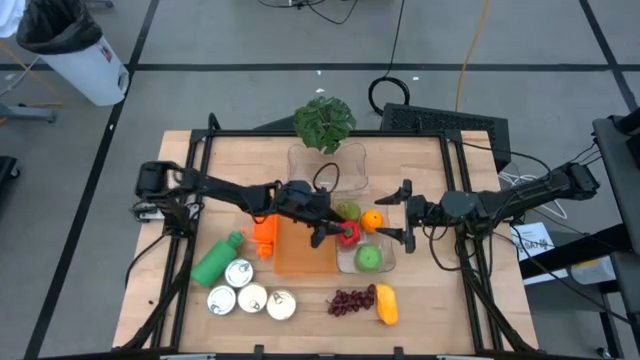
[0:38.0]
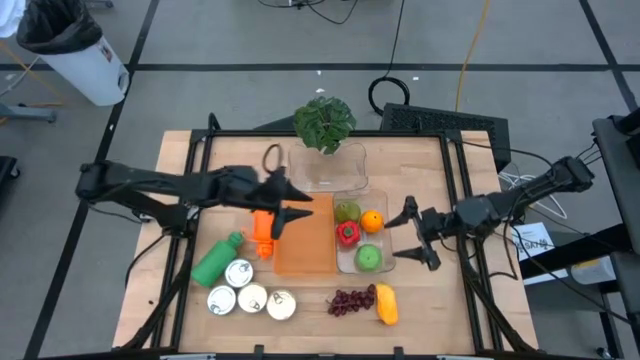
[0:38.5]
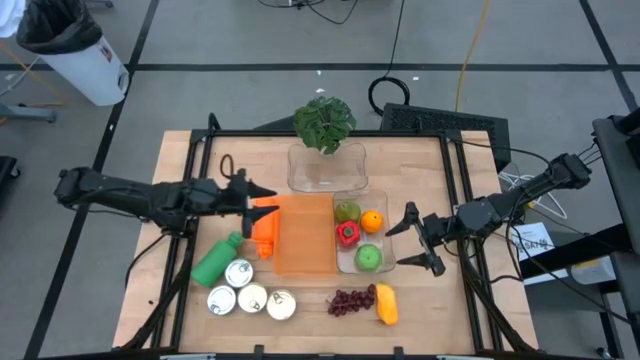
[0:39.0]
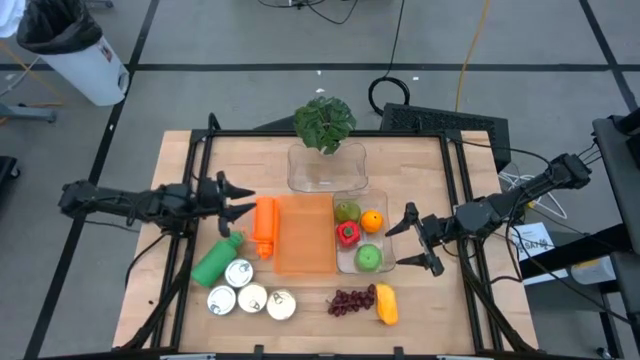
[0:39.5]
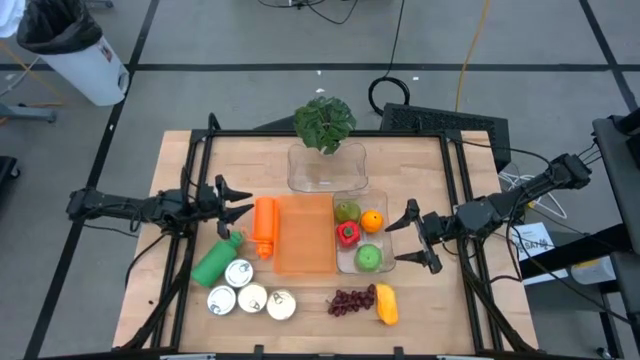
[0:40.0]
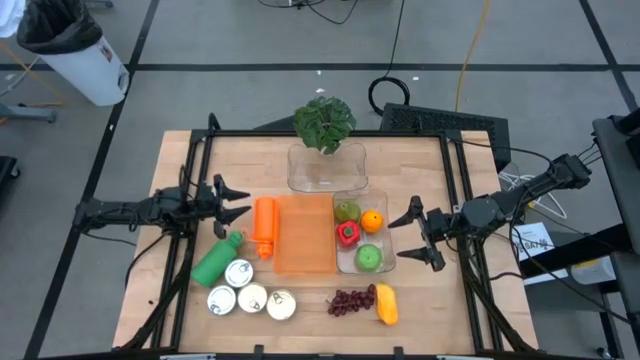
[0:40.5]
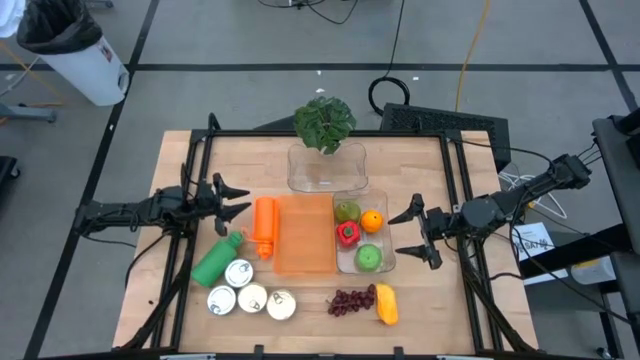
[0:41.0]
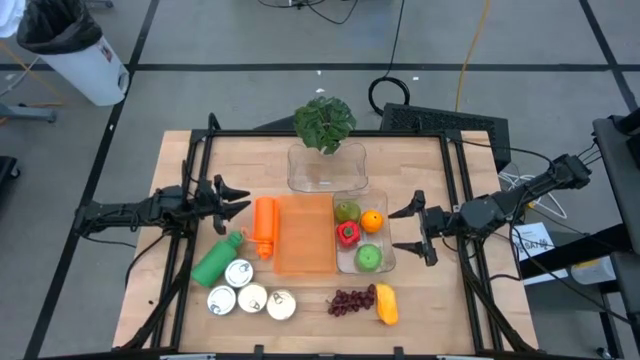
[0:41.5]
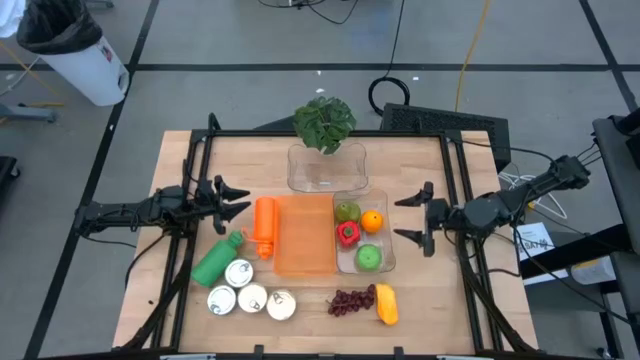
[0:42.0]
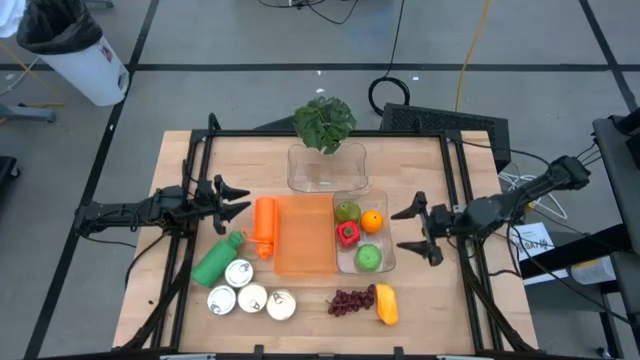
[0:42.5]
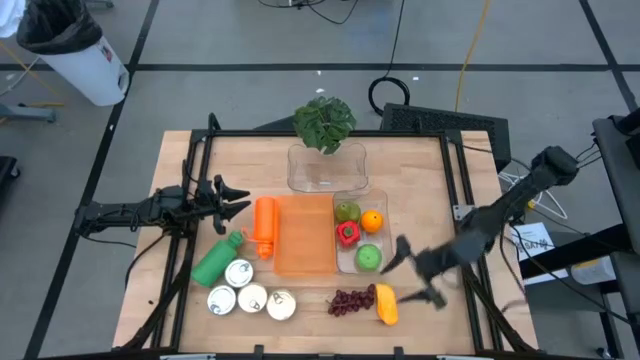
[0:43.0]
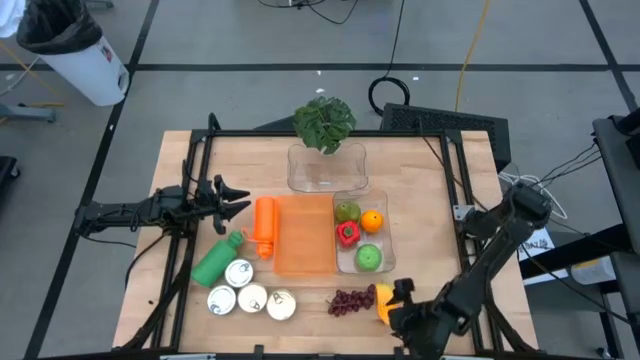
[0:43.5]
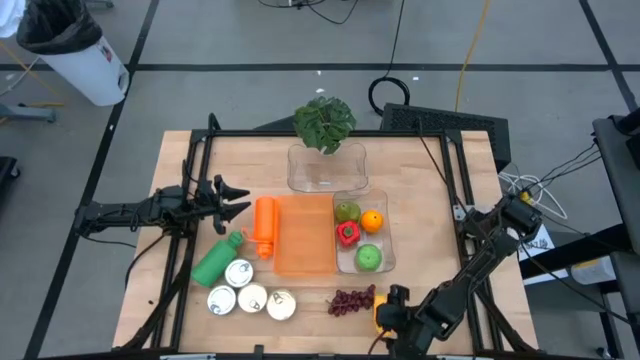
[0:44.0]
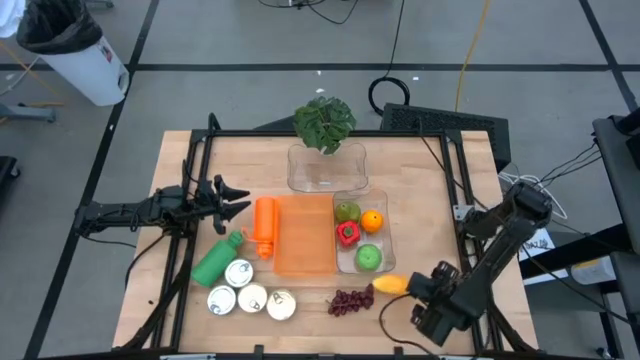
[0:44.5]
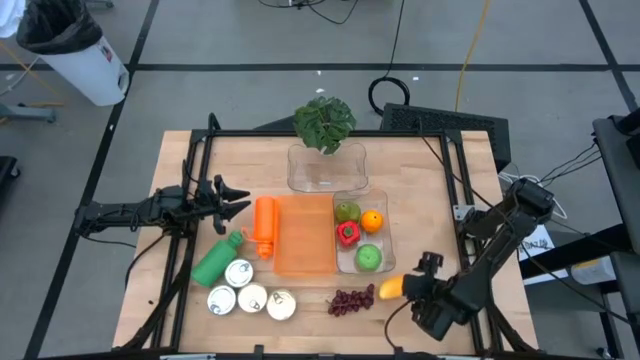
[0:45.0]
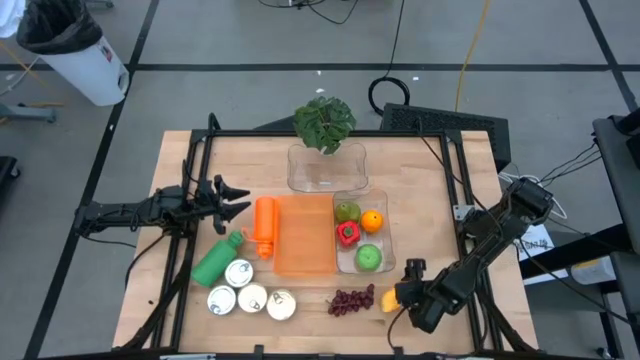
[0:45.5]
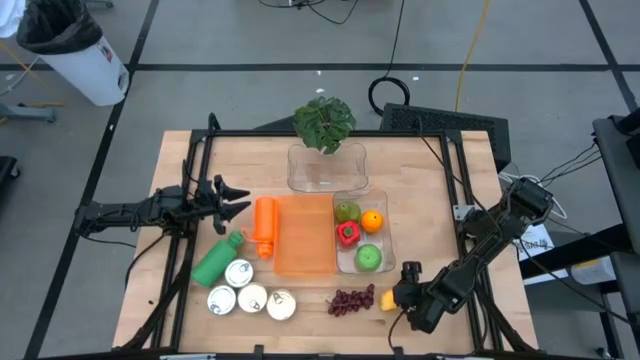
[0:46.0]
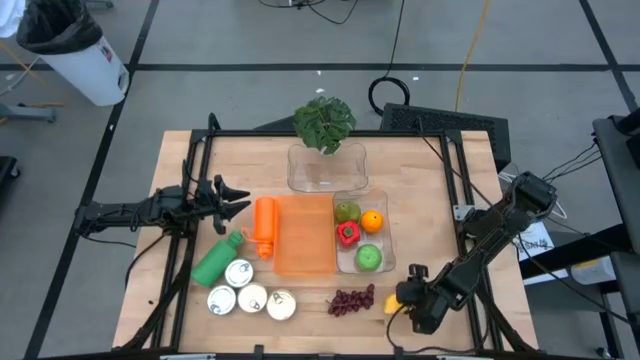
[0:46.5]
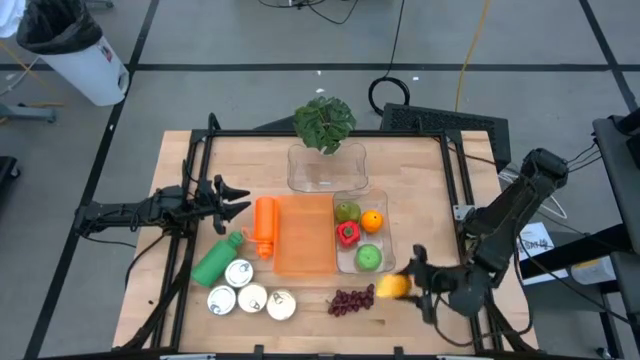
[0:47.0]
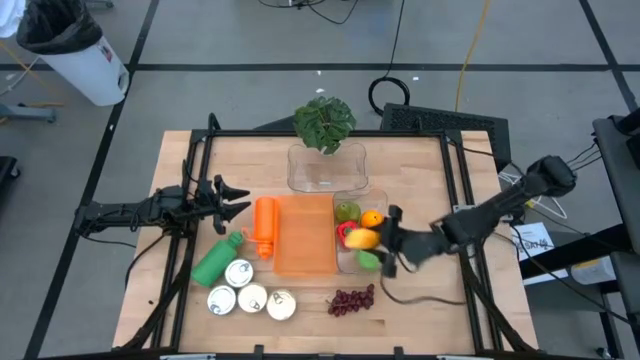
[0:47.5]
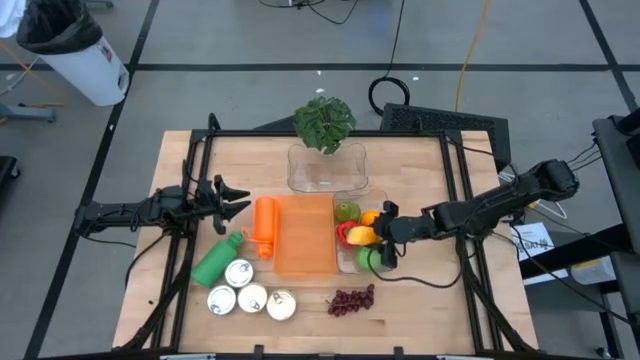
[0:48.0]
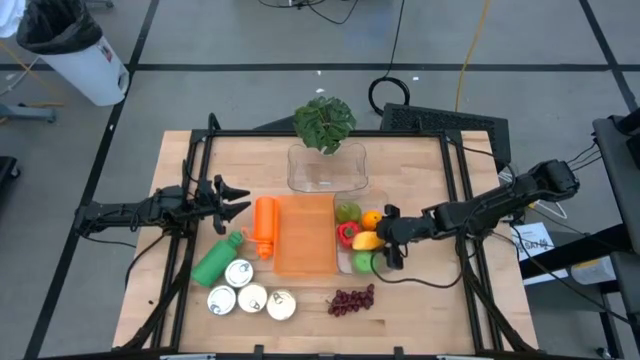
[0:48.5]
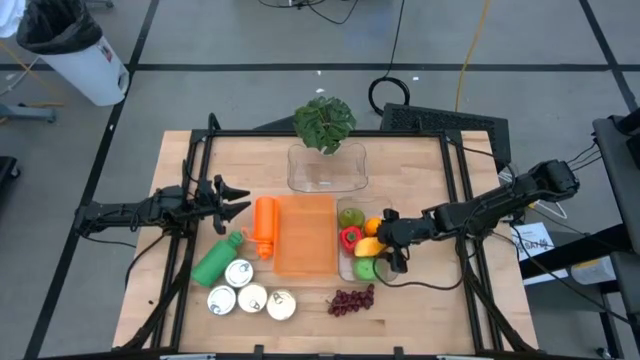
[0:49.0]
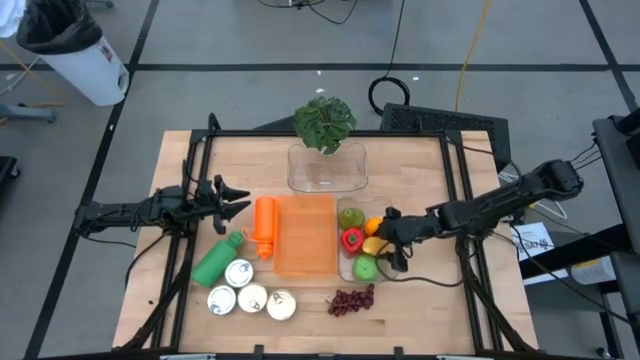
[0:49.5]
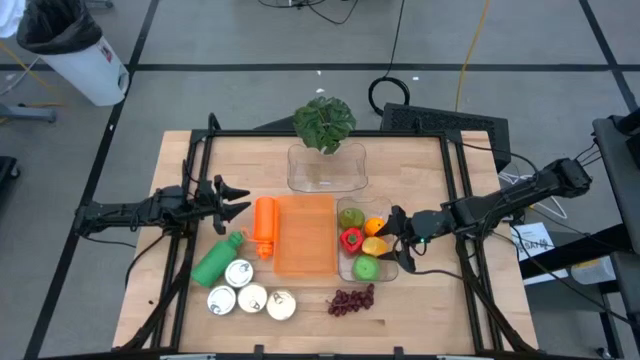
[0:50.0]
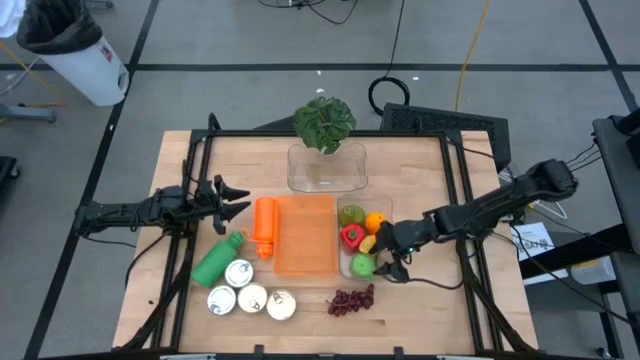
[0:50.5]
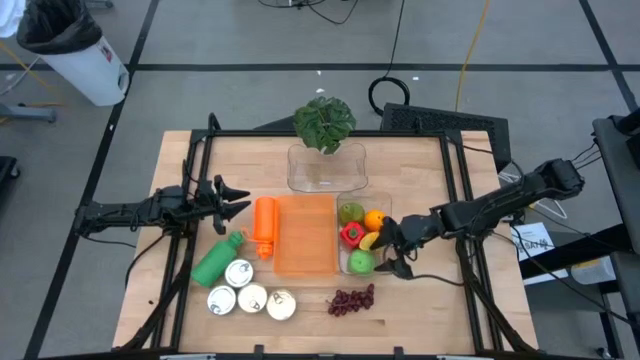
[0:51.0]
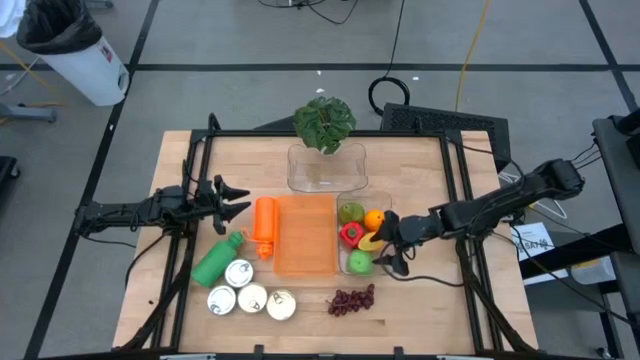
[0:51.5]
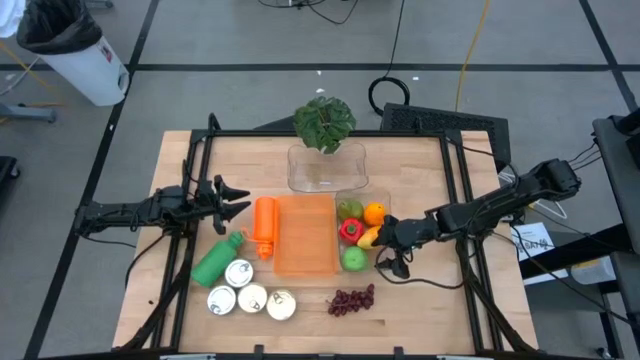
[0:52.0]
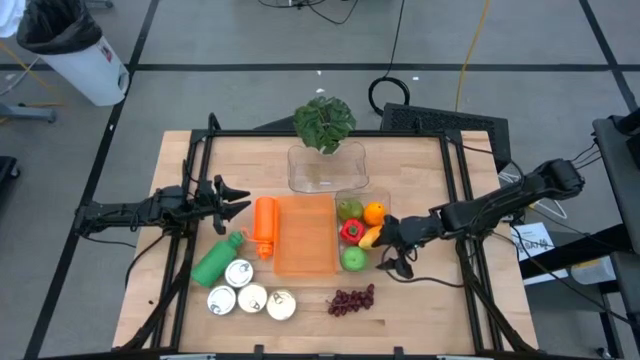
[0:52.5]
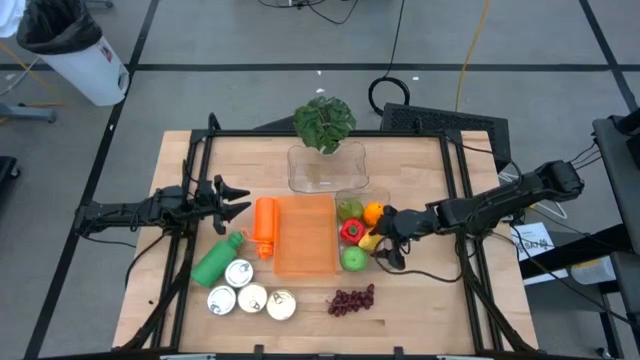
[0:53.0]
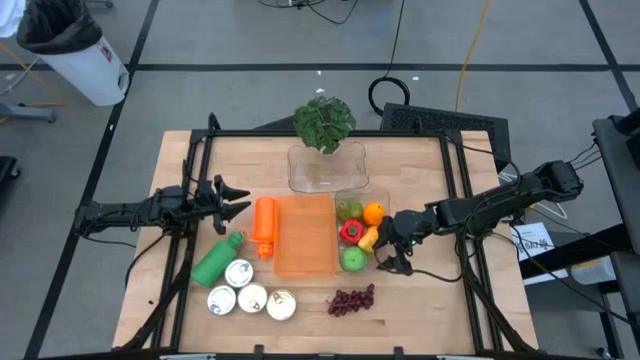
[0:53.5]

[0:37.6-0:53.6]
Task: Pick & Place Food Item
Put the yellow mango into the bottom transparent bin

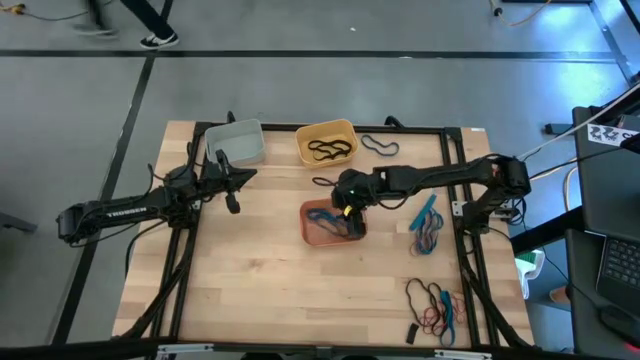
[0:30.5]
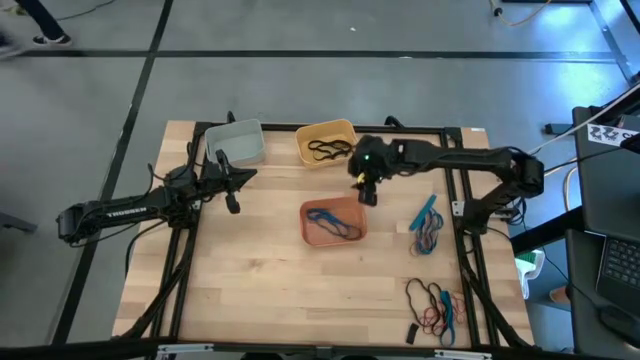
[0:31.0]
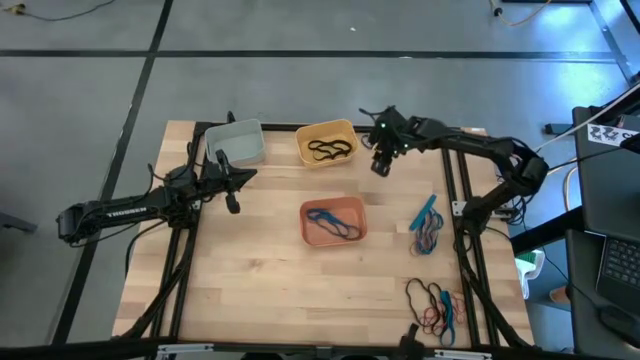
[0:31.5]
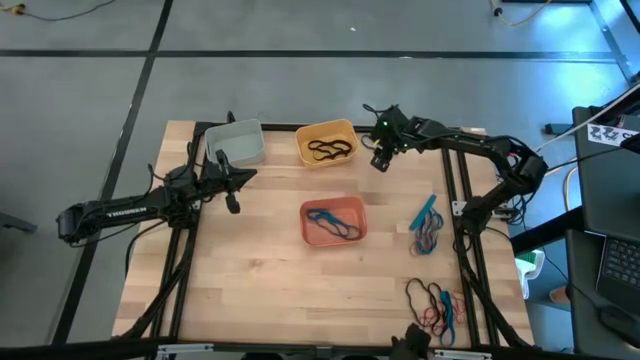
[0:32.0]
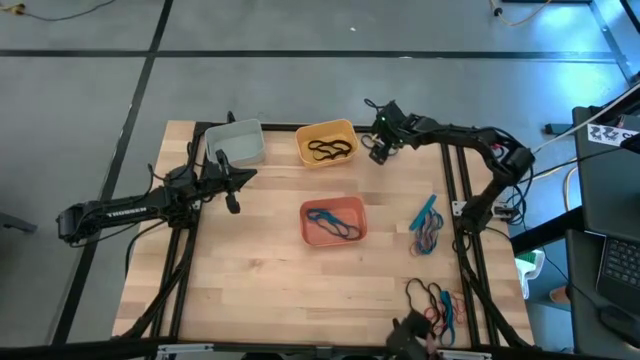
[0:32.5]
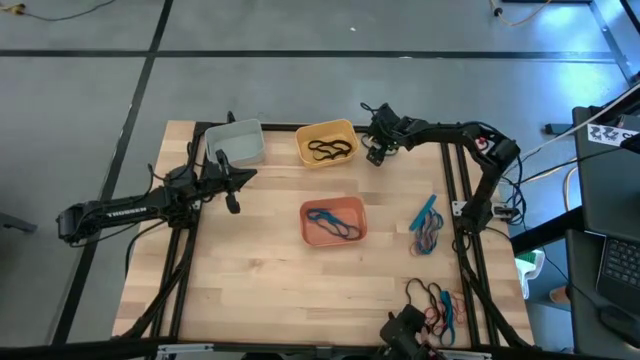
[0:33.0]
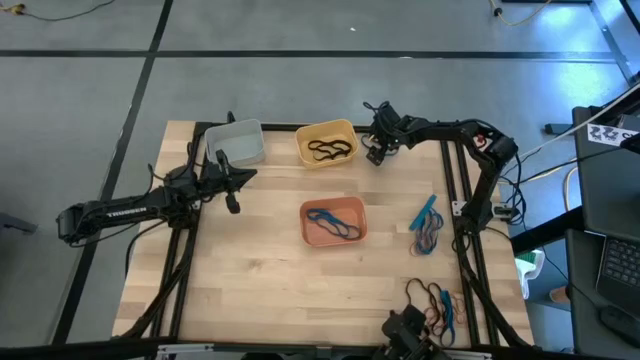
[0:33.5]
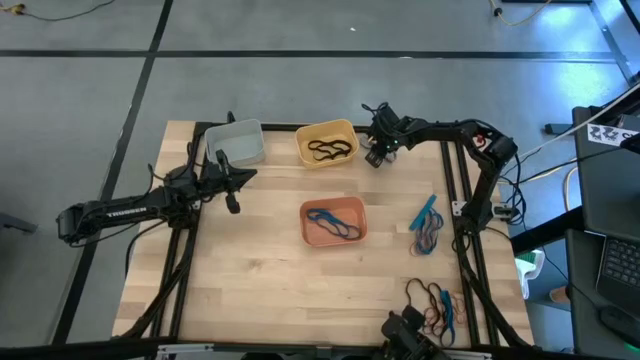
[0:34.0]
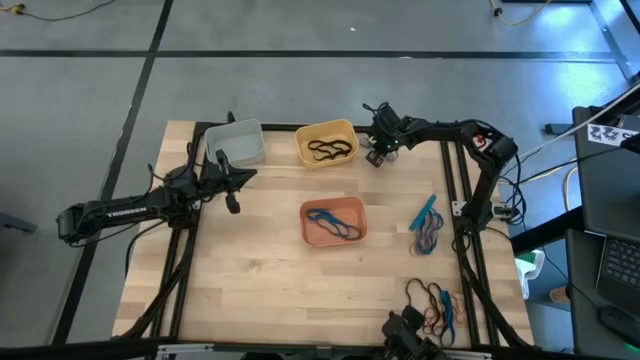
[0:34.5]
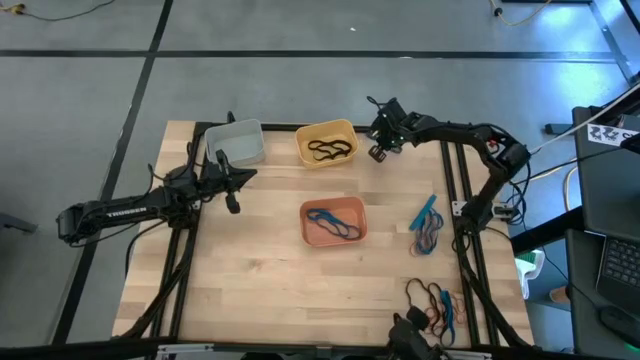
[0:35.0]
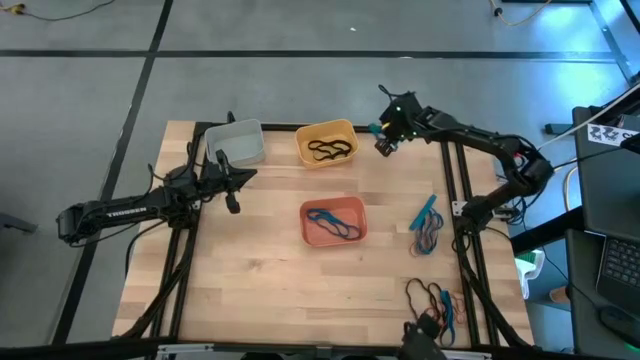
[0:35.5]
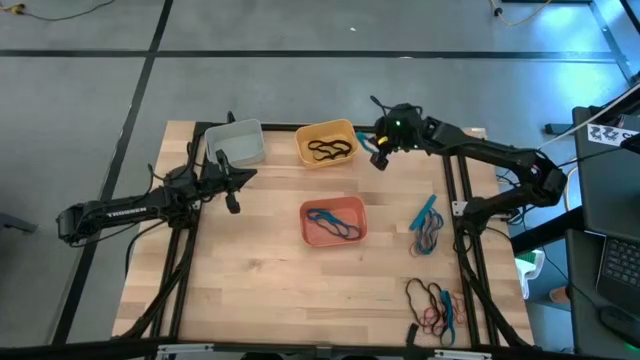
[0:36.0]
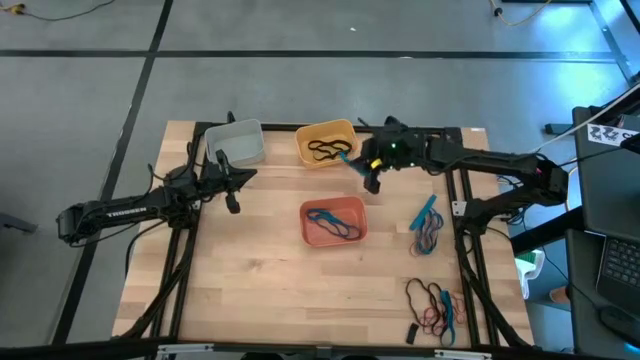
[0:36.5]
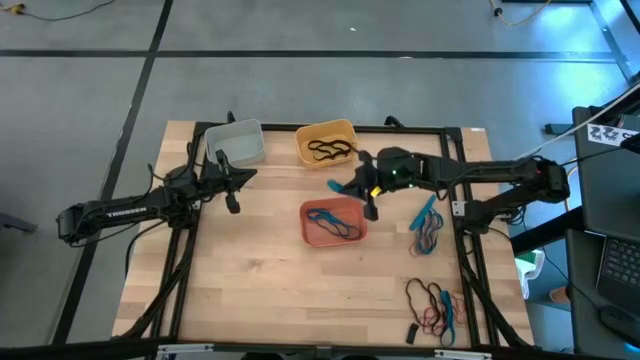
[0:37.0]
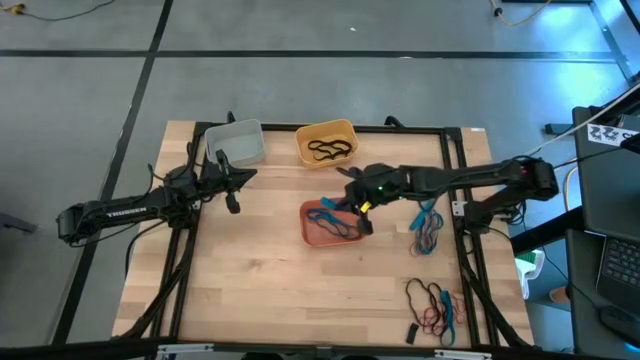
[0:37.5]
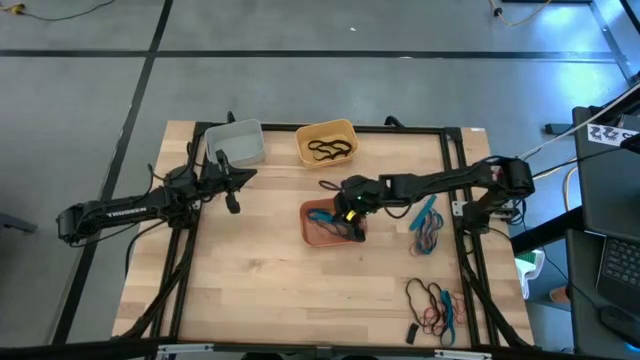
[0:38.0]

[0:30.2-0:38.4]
Task: Sort rubber bands into baskets
Put the blue rubber band into the orange bin
